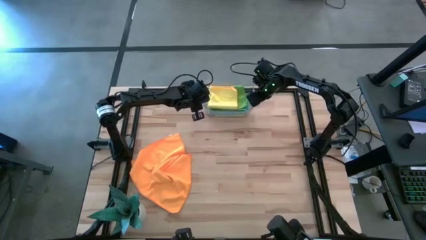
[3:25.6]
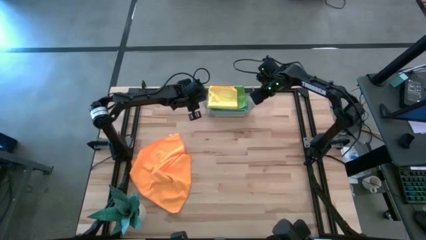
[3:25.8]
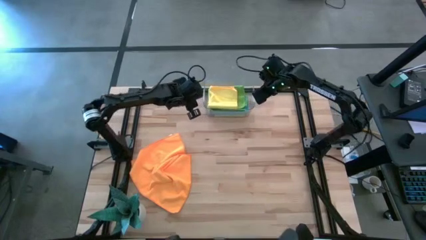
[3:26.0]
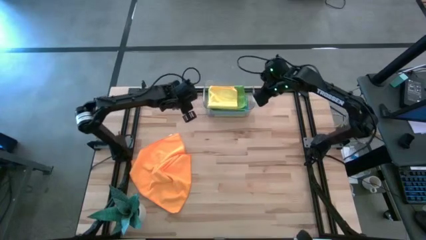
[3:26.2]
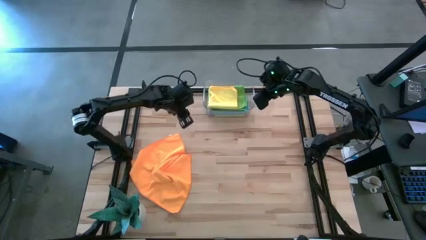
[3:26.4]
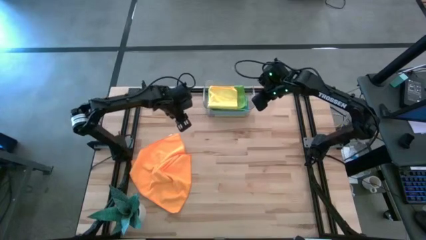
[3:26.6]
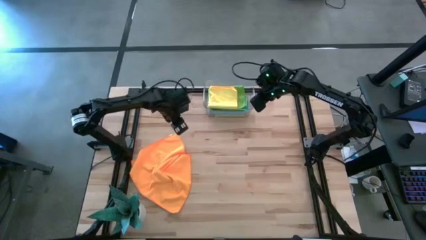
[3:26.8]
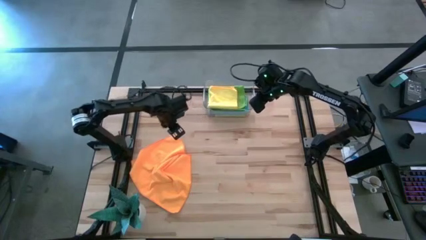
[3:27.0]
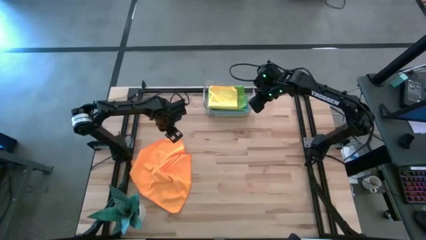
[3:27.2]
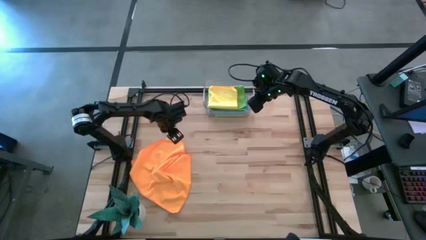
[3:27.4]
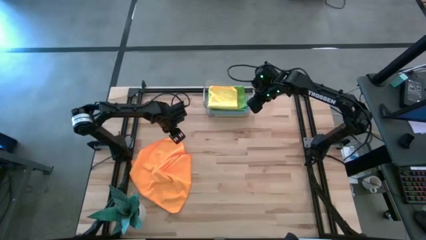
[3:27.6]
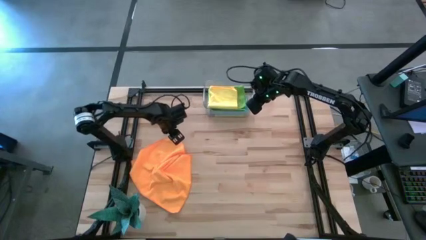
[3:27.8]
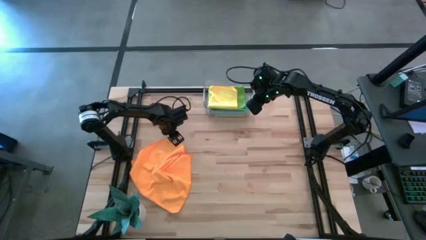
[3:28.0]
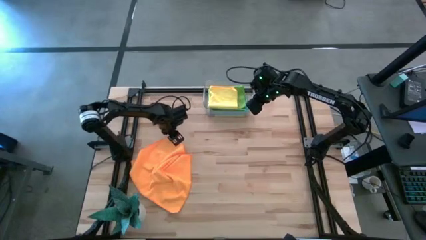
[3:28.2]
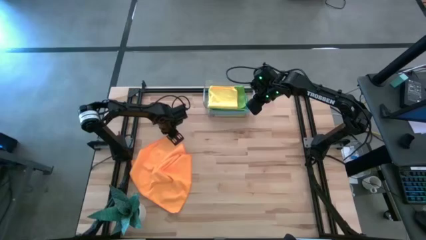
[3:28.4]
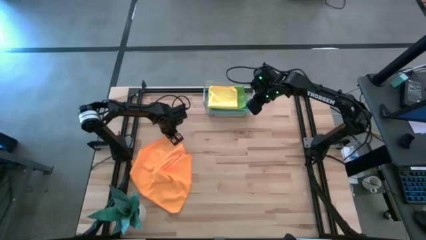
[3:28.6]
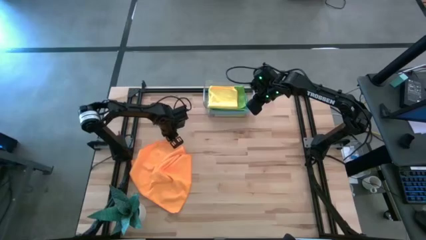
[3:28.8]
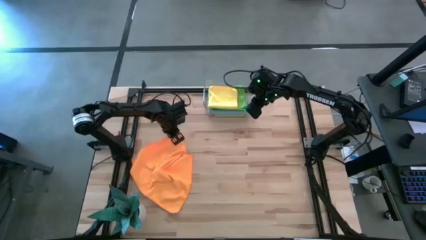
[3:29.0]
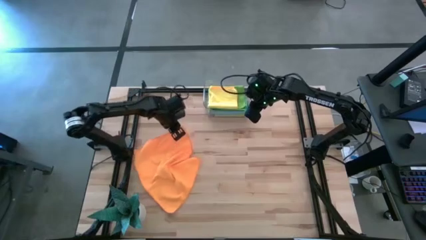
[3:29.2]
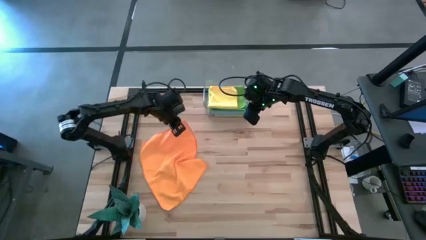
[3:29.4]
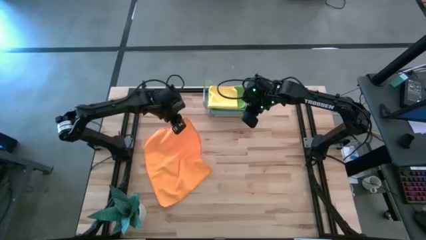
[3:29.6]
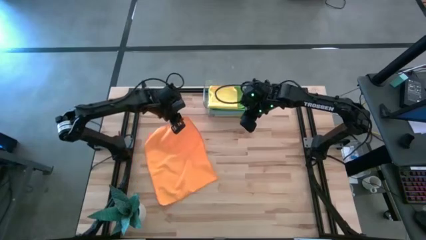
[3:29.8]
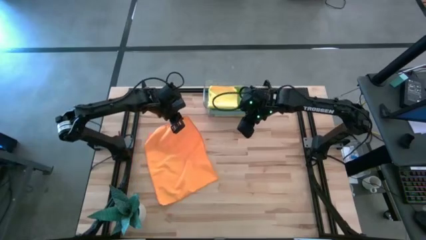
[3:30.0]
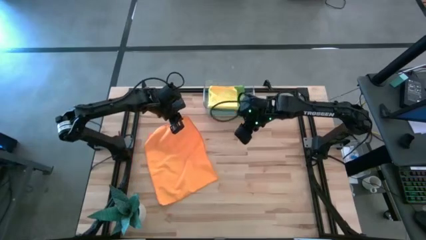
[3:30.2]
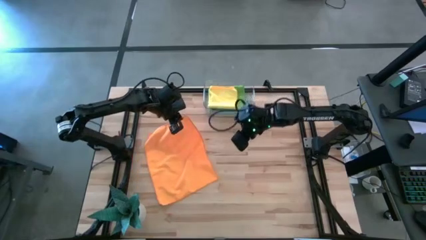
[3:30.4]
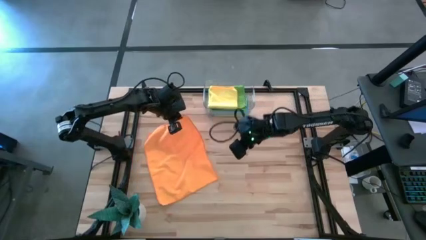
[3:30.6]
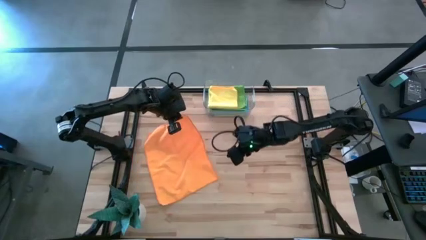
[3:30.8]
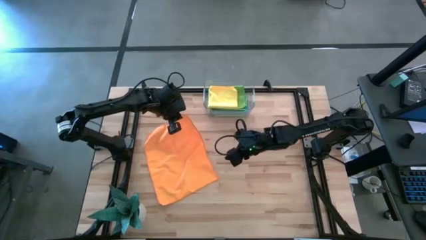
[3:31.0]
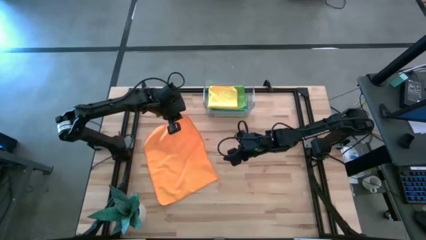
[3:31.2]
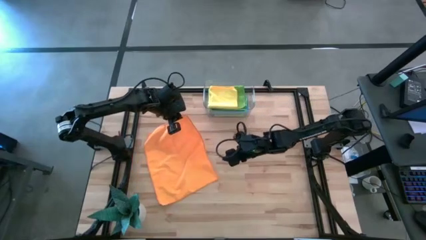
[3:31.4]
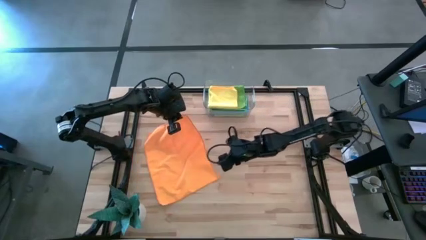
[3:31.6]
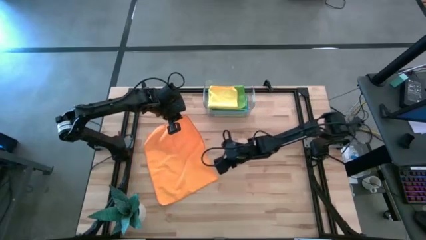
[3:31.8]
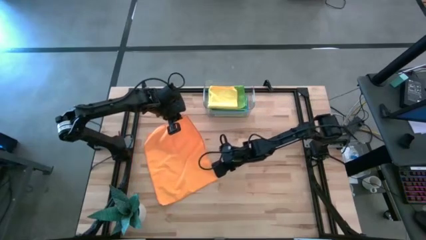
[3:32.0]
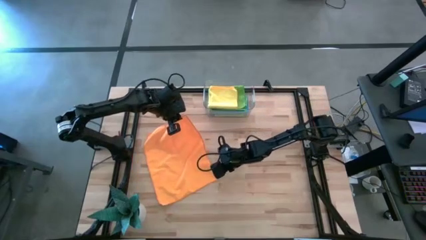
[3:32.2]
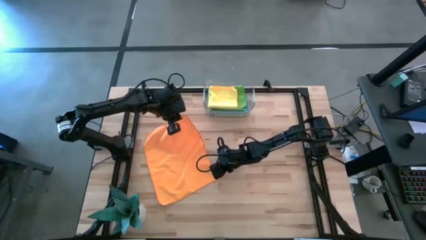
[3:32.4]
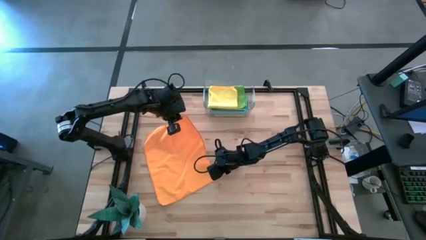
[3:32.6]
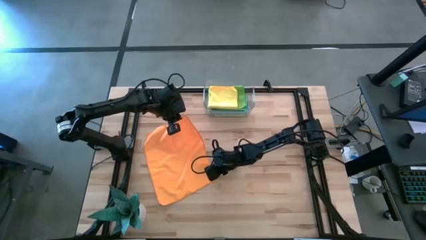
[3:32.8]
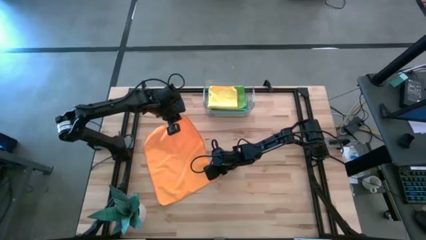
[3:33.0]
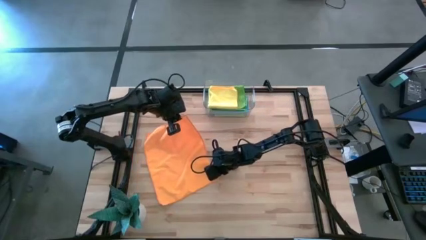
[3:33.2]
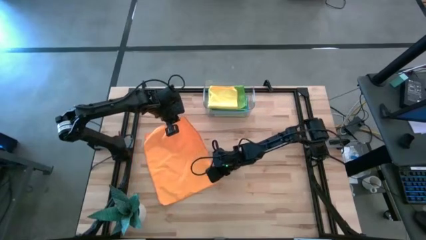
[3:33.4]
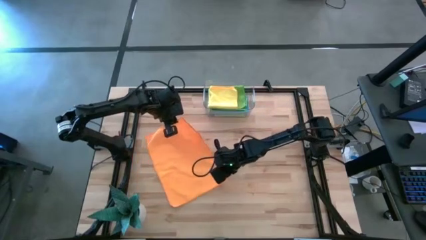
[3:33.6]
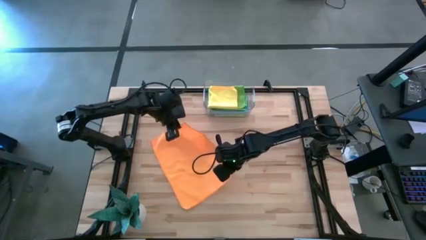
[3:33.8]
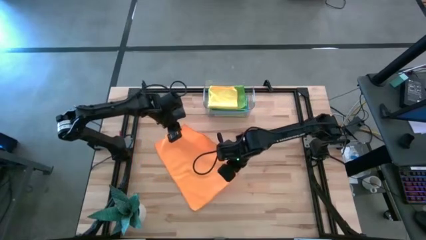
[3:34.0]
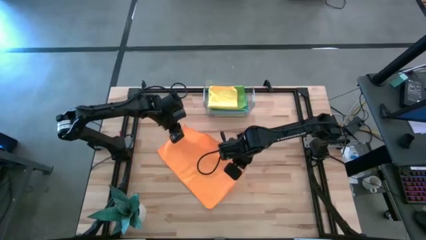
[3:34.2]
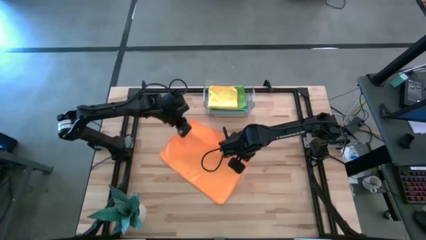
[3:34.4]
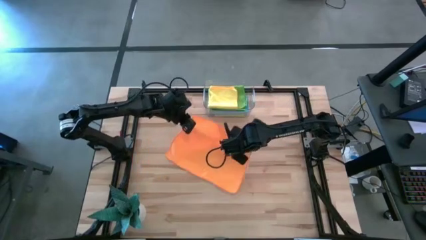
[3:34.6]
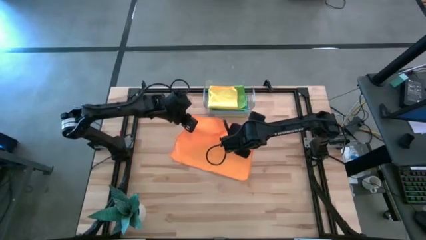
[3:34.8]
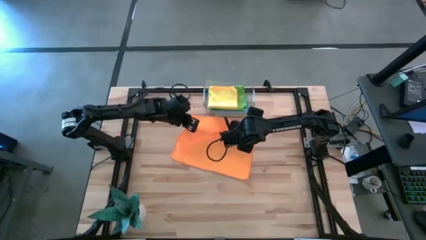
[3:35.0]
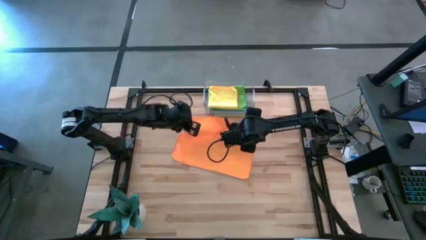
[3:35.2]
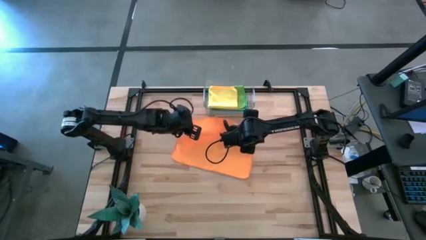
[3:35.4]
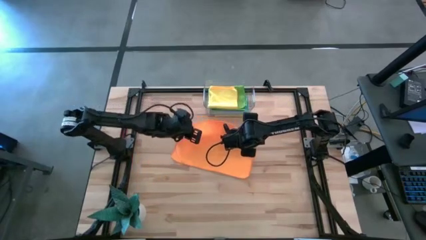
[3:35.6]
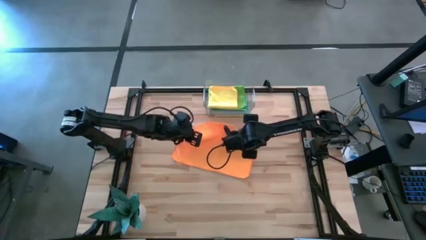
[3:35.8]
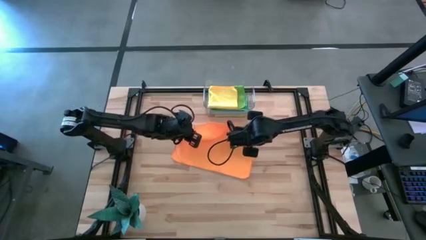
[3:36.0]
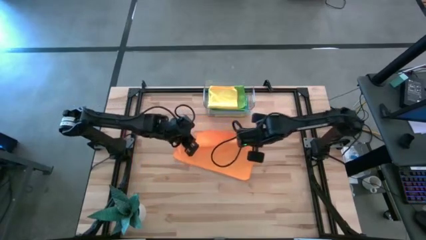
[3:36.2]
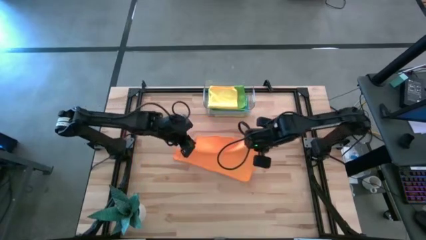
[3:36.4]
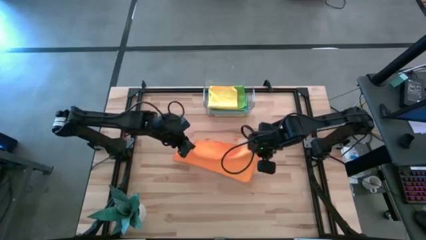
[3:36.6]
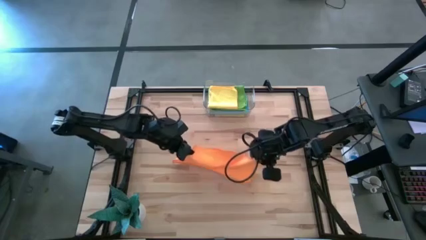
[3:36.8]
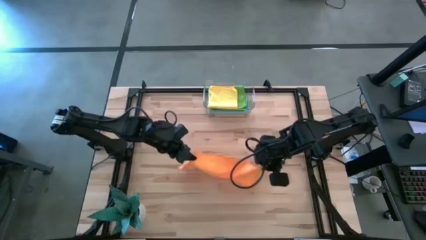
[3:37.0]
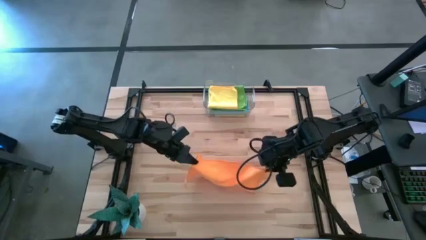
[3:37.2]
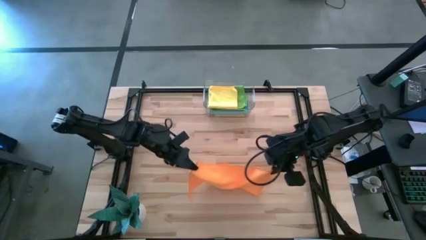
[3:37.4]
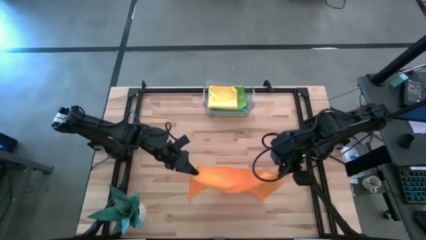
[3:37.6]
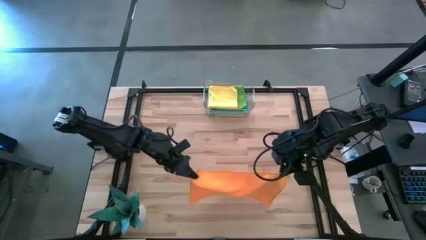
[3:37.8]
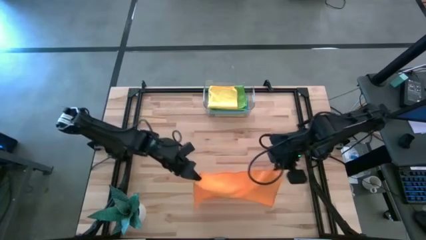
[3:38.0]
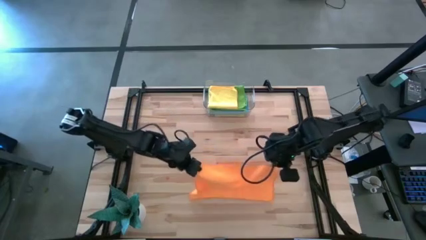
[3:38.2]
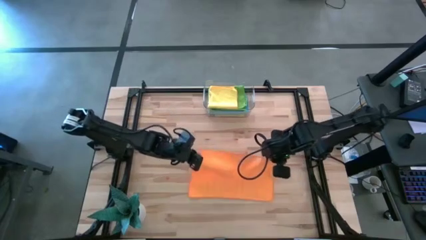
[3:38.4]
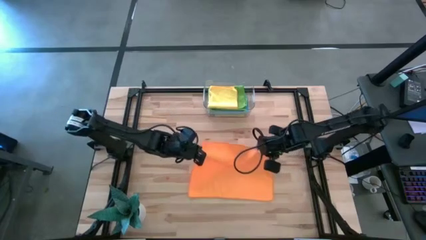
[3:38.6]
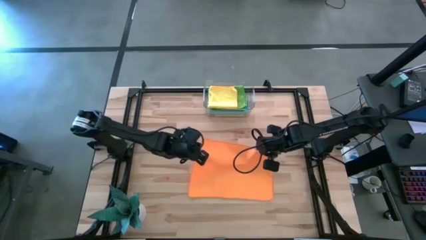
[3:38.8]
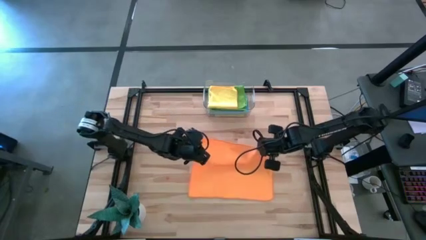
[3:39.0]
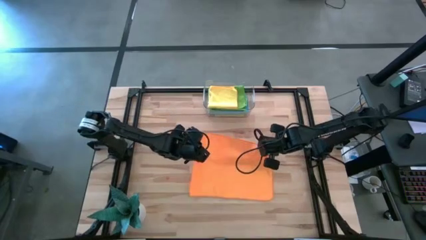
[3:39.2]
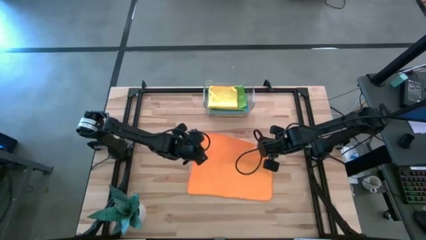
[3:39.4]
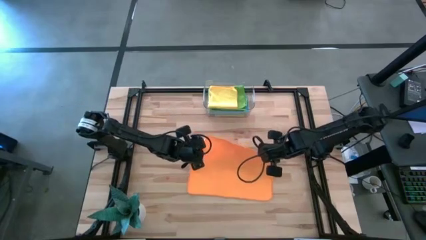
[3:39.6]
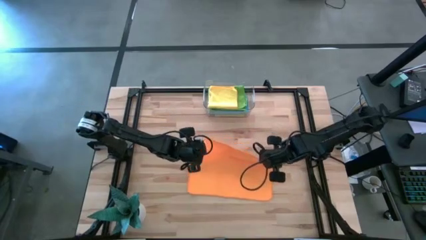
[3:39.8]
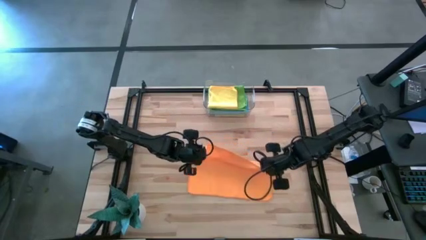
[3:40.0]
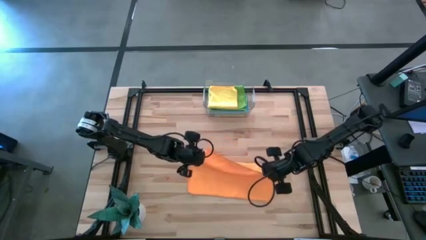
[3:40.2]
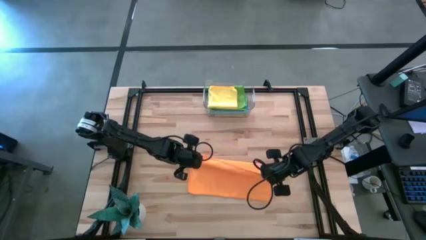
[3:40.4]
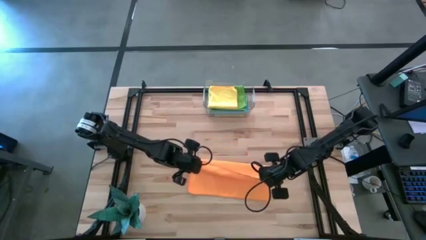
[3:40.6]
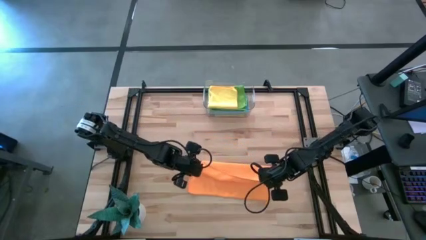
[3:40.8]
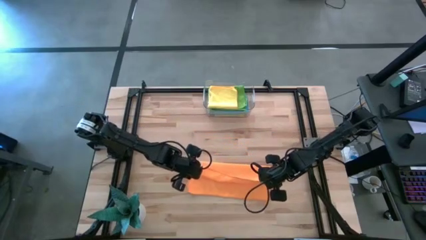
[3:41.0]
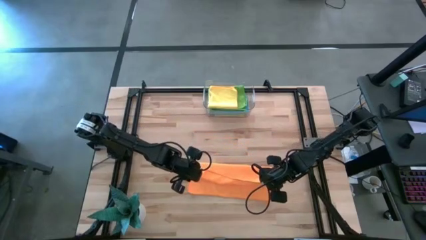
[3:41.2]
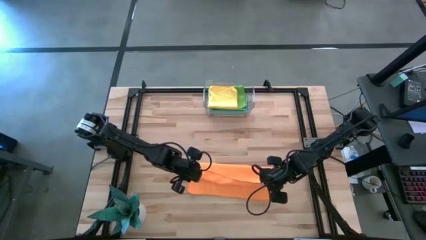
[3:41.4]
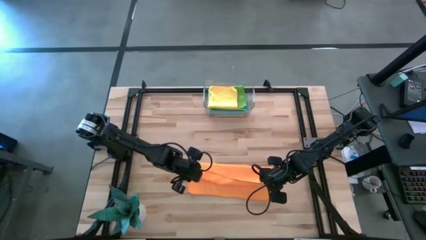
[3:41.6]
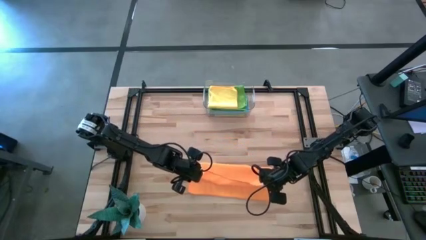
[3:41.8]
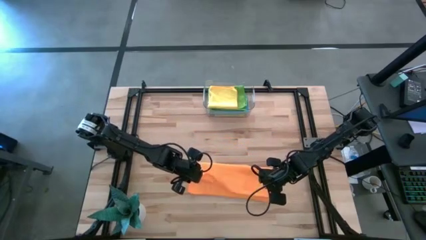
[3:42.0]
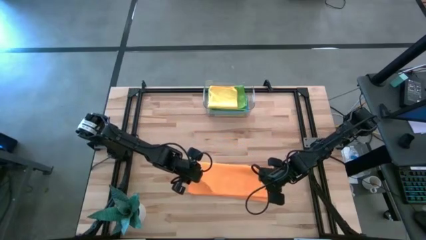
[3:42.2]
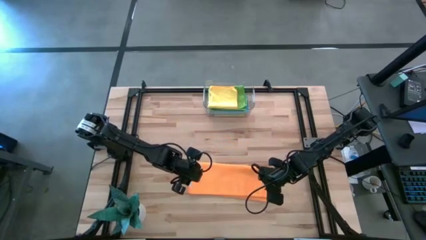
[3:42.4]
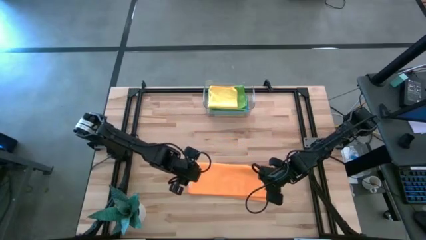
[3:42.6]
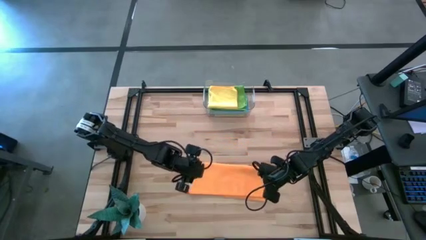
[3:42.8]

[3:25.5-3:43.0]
Task: Fold microfiber towels
Fold the orange microfiber cloth
